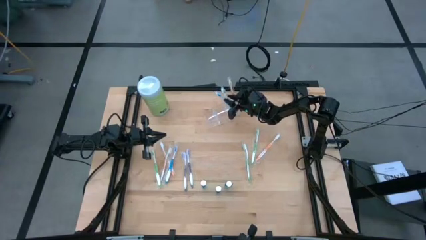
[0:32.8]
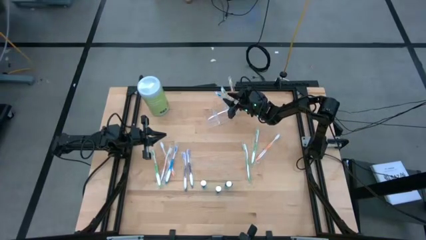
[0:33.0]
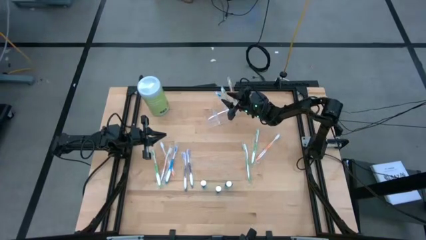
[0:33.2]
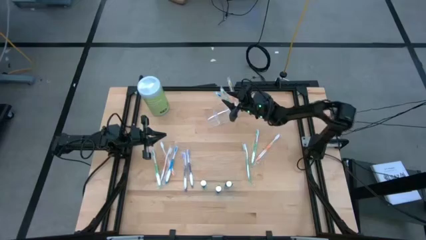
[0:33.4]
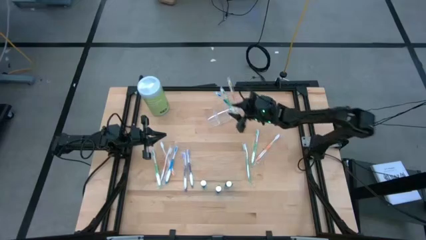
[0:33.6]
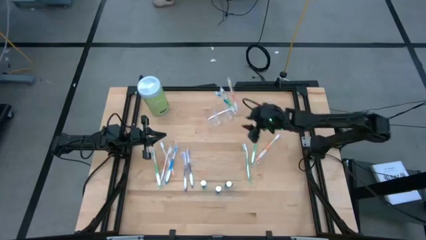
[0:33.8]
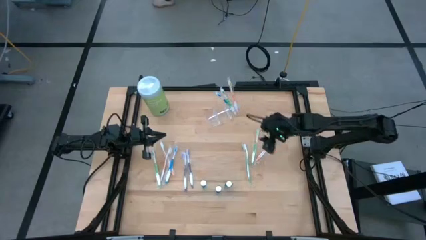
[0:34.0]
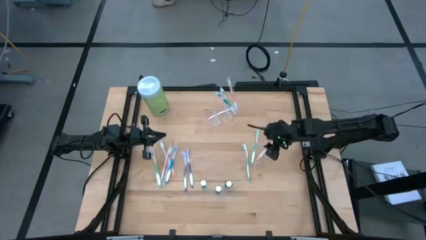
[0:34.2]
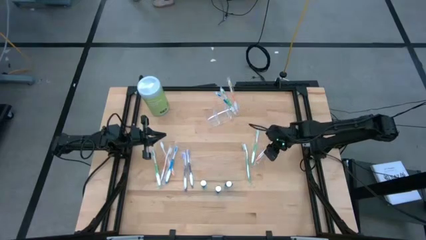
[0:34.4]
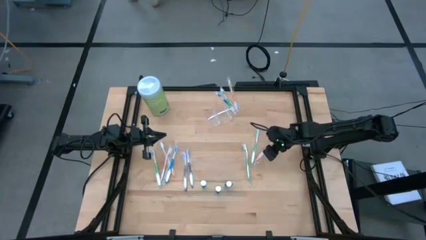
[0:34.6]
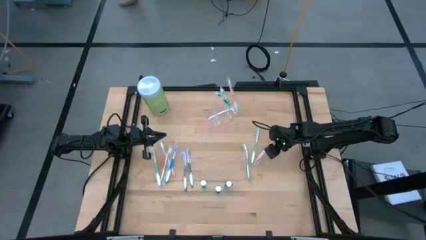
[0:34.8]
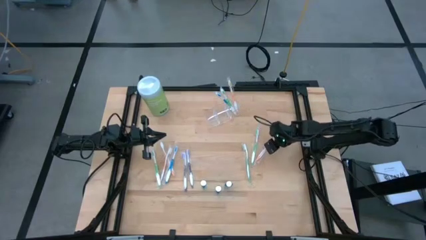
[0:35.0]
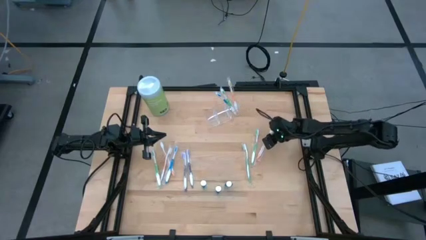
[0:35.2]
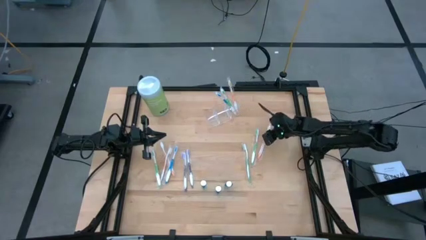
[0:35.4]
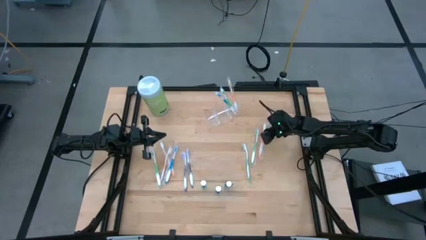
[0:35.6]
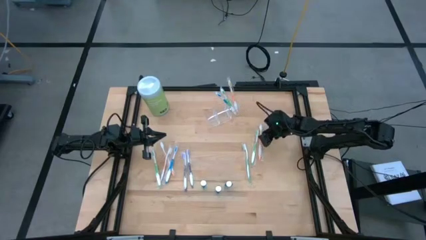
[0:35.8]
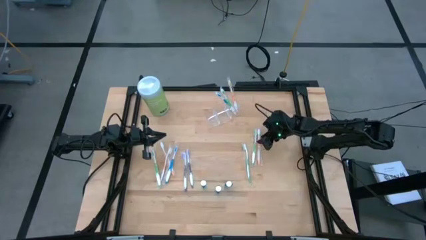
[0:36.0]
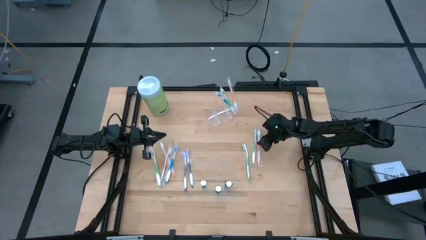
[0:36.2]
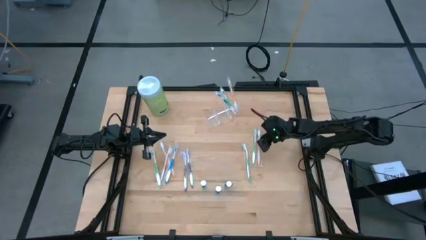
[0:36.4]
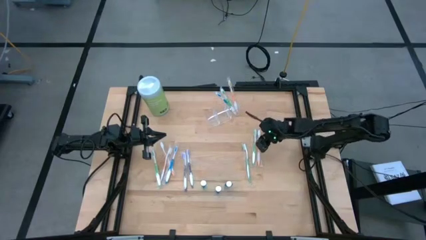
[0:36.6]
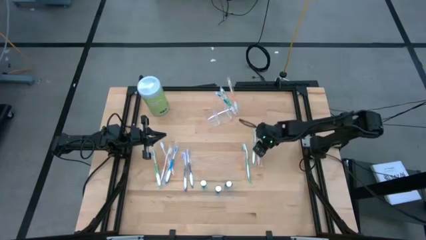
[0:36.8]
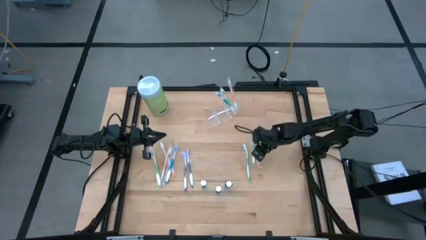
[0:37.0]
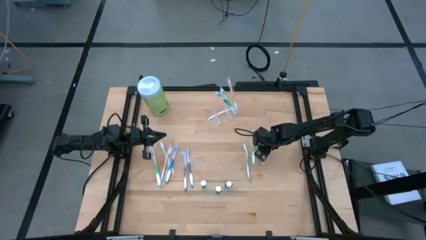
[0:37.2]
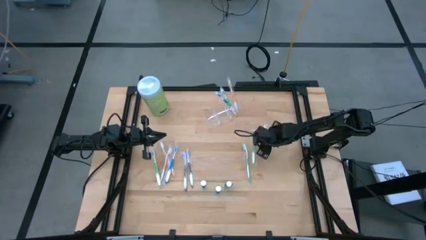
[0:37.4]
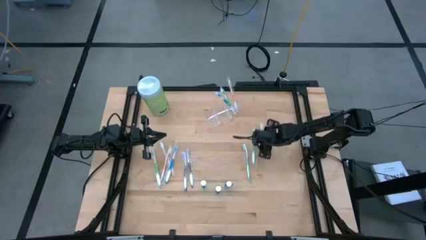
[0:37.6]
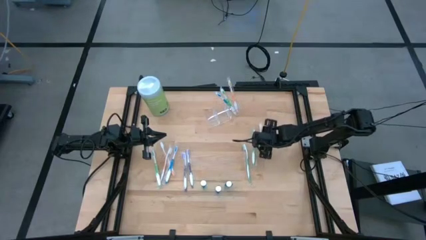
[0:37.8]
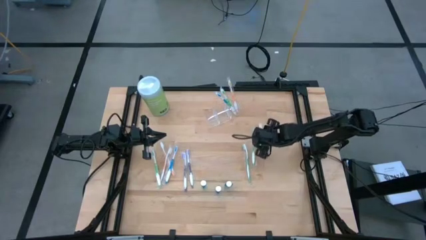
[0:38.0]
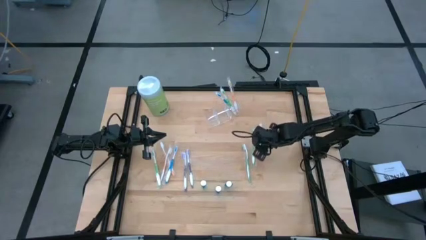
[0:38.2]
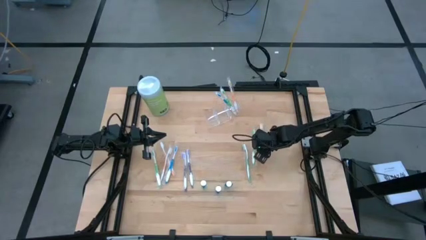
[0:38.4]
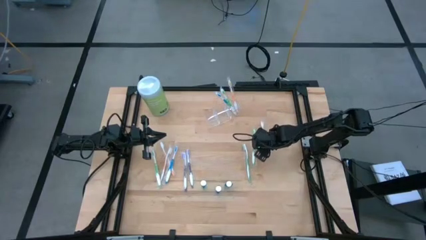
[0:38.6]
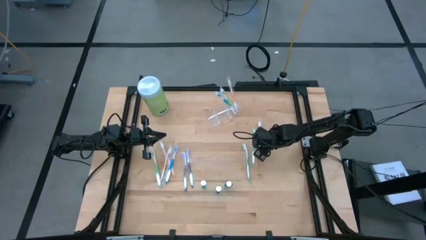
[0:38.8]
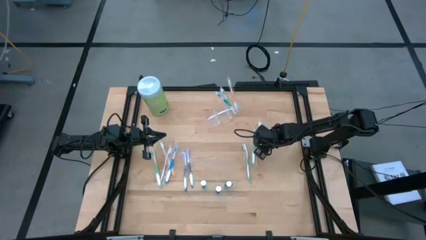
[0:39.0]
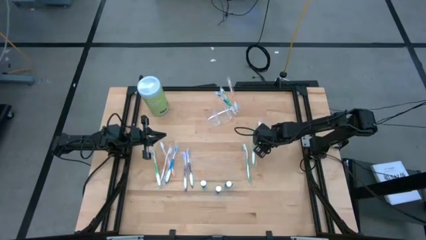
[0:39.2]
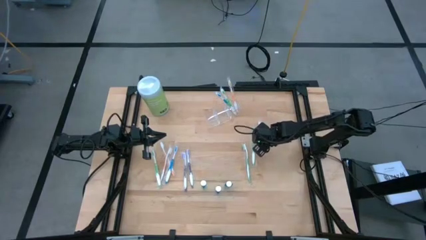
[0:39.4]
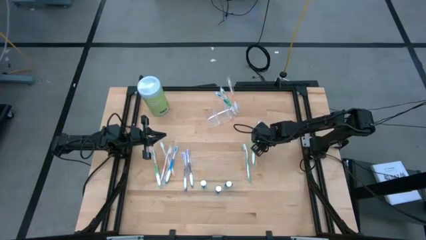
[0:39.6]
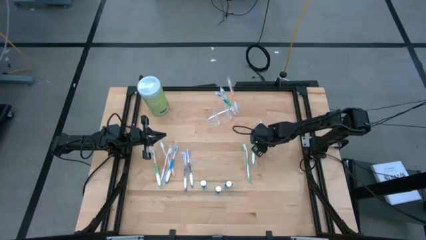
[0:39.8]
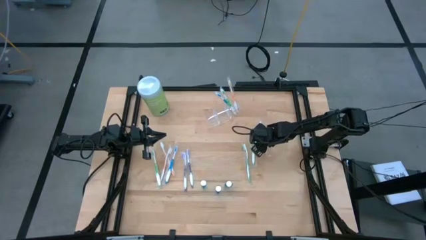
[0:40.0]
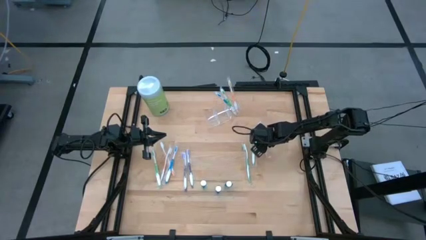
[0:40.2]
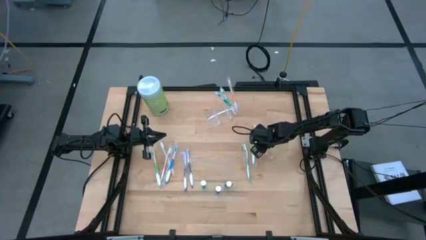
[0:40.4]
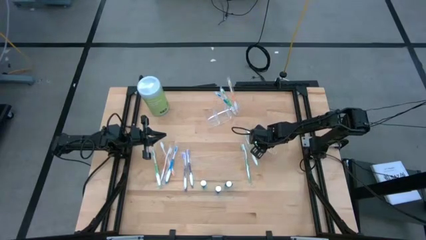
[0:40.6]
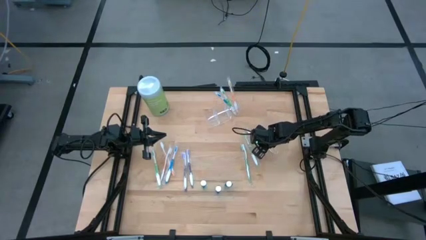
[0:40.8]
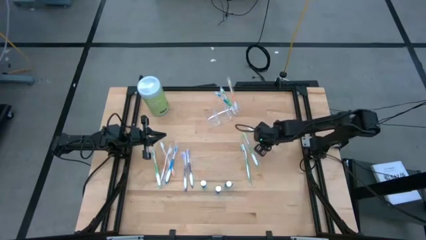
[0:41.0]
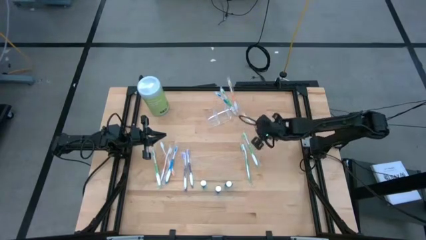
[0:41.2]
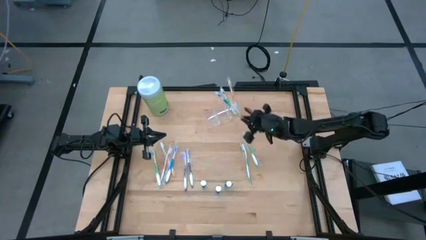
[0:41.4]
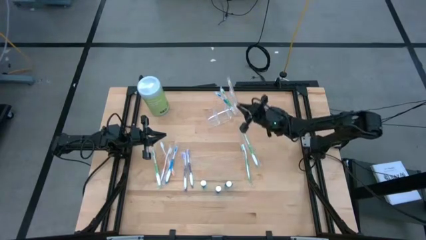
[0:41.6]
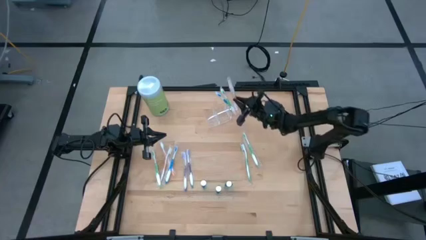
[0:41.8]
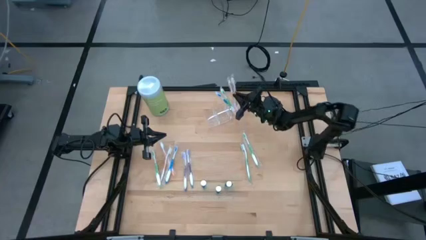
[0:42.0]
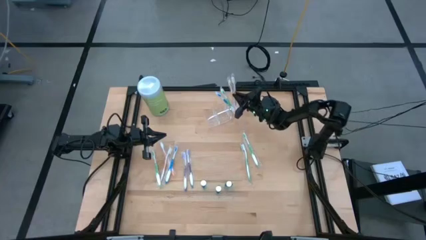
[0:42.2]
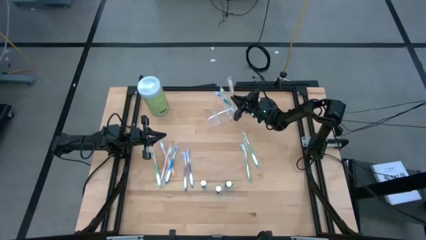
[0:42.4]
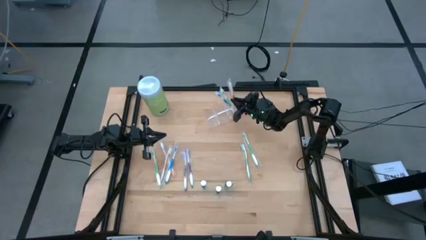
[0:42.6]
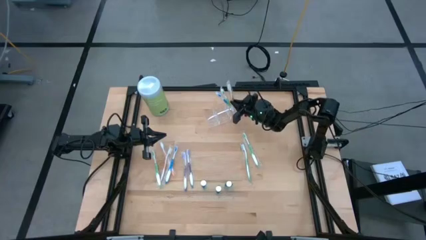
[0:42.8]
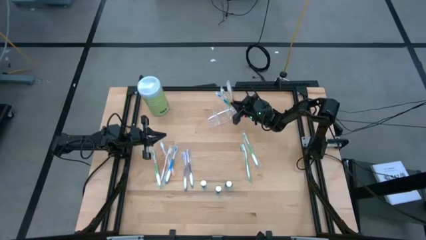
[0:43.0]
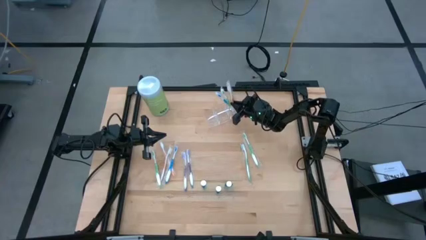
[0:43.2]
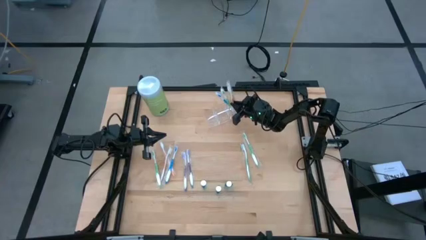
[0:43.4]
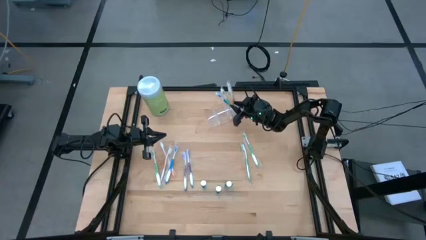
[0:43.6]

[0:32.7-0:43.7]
Task: Pick & Place toothbrushing station
Put the orange toothbrush into the transparent organizer

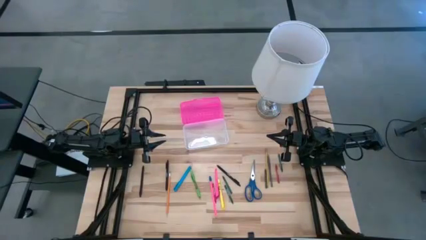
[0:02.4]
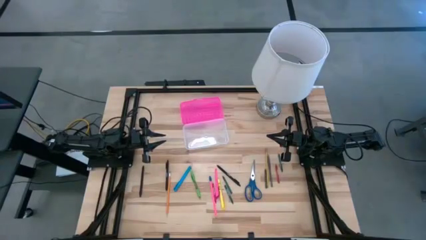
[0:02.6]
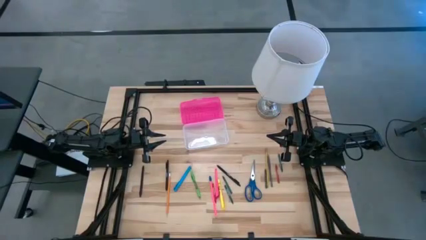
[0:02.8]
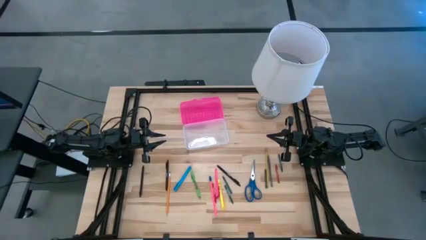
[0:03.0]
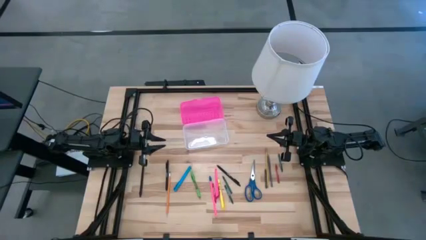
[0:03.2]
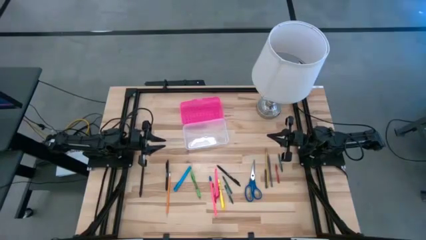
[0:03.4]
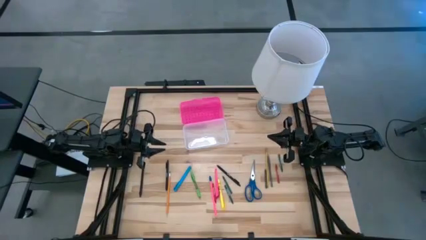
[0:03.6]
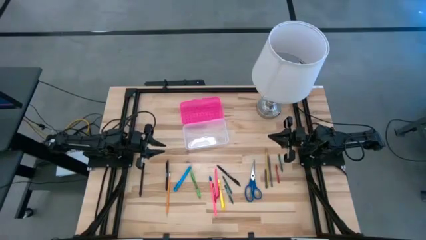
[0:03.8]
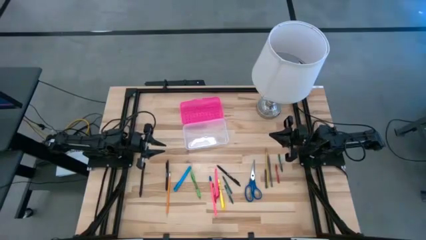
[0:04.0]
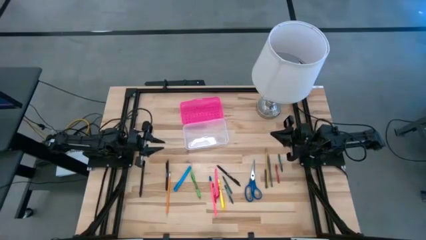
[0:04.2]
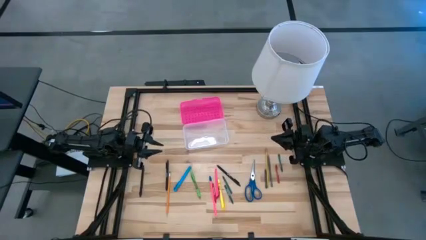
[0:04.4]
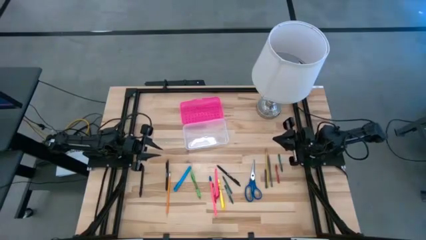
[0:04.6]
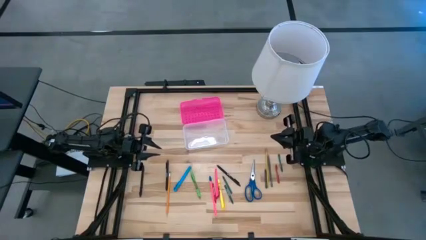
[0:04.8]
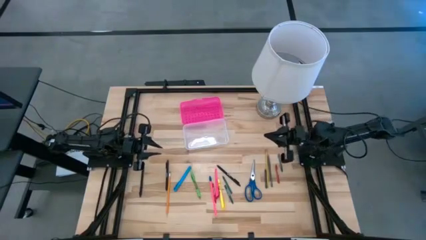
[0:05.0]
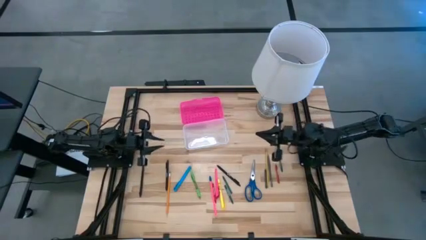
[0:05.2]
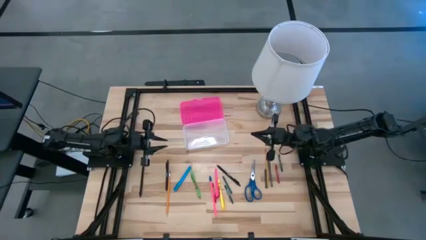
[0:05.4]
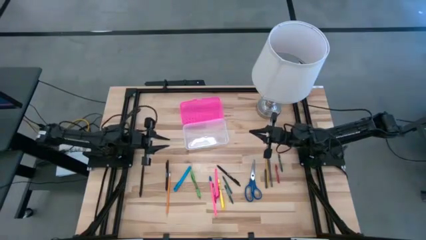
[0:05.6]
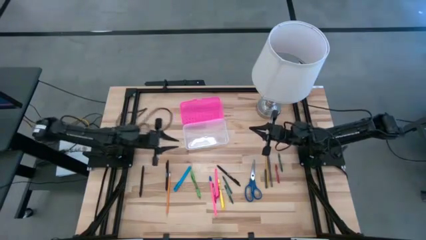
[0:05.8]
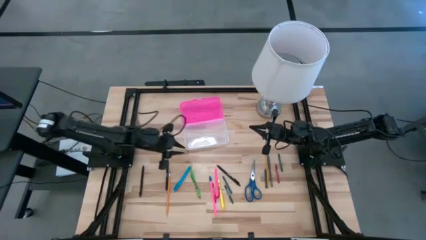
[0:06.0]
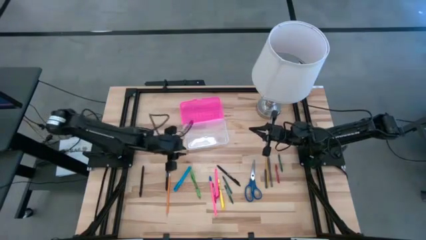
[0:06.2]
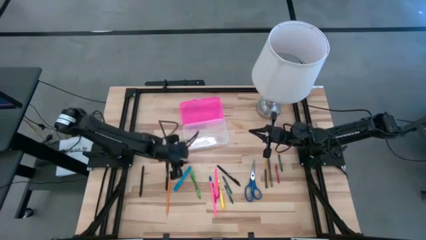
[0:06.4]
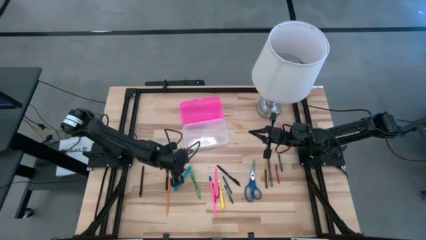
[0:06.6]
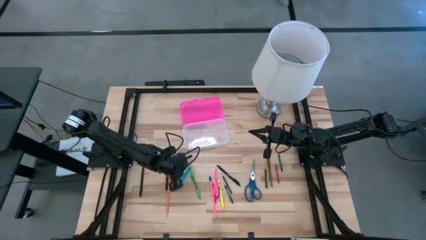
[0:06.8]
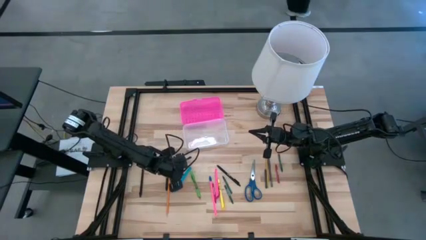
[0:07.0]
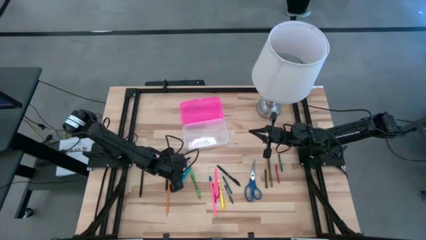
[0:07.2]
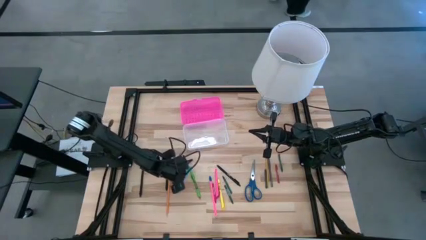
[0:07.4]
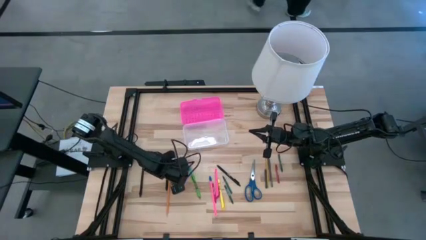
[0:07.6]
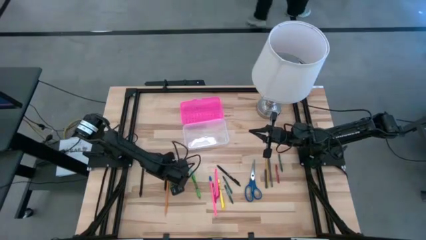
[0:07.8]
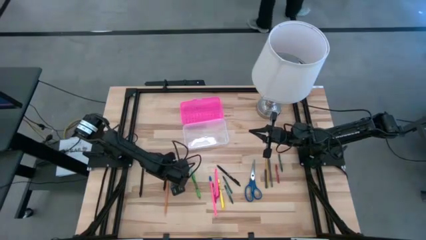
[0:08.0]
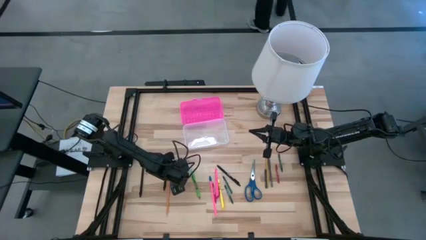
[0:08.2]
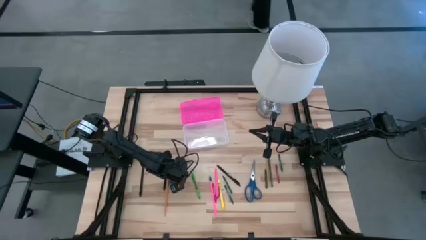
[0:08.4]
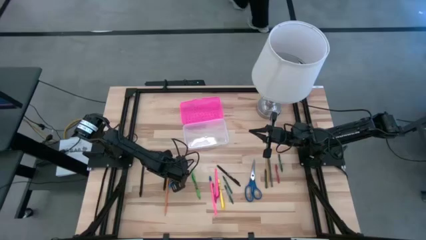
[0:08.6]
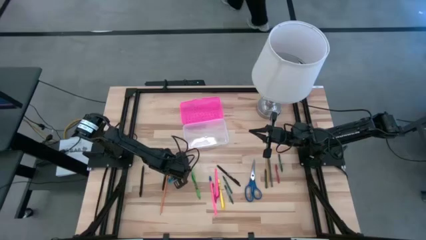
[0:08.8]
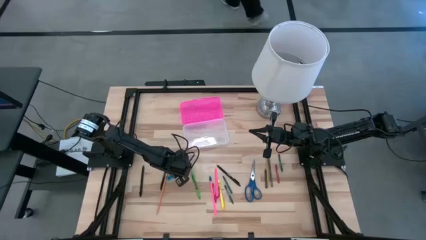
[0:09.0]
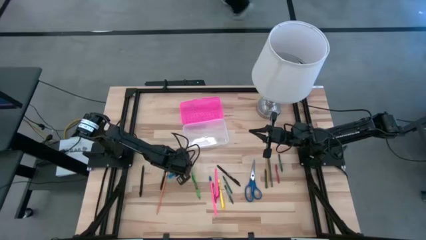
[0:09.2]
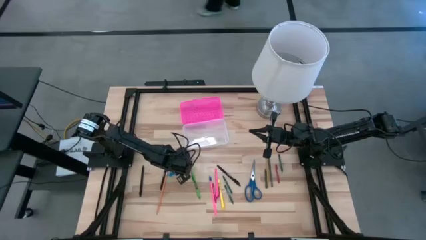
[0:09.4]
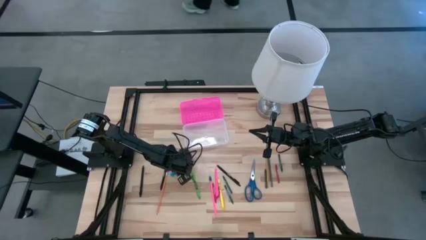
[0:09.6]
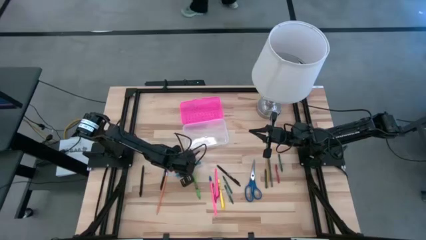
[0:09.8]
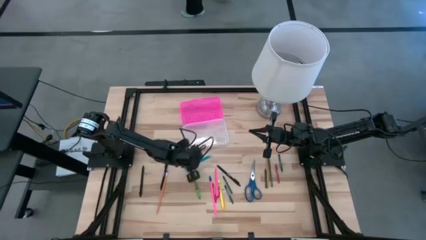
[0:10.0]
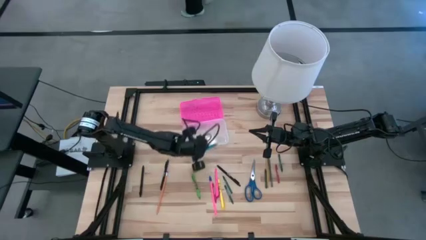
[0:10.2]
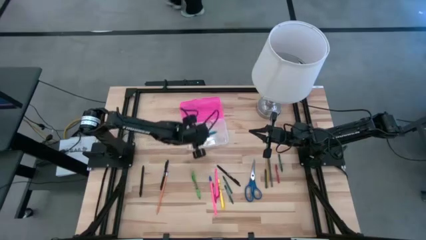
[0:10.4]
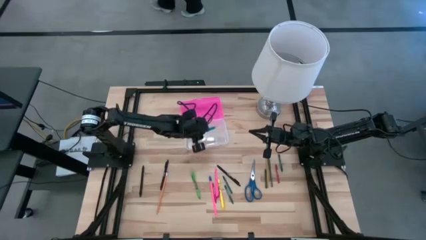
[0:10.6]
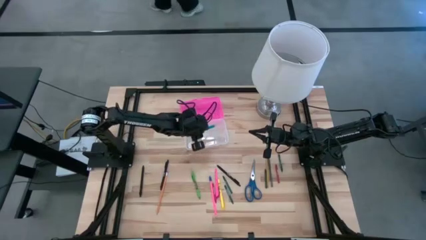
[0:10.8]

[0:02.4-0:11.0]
Task: Pick & place school supplies into a supply box
Put the blue pen into the pink supply box
